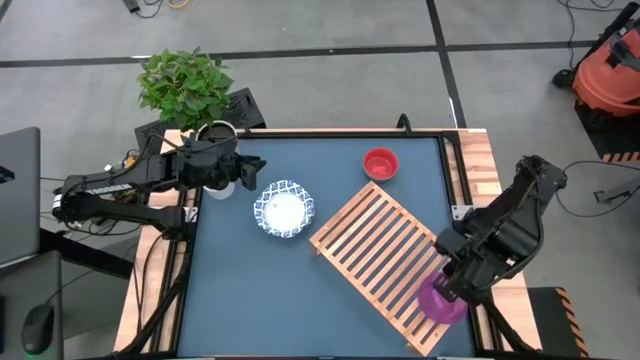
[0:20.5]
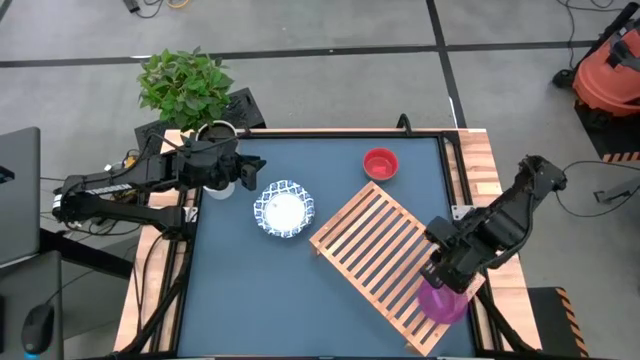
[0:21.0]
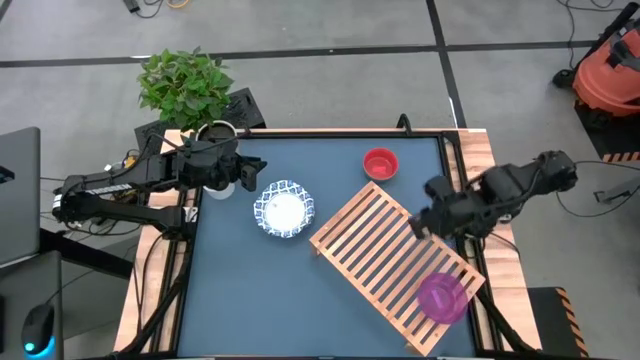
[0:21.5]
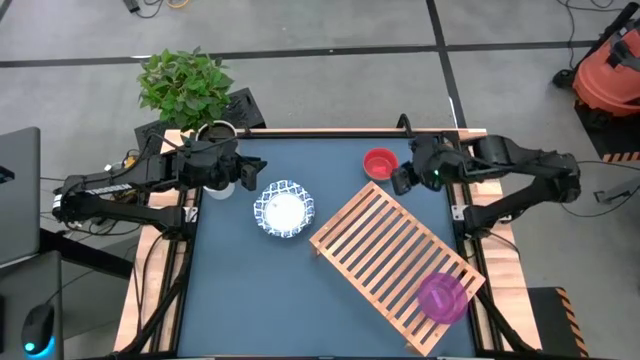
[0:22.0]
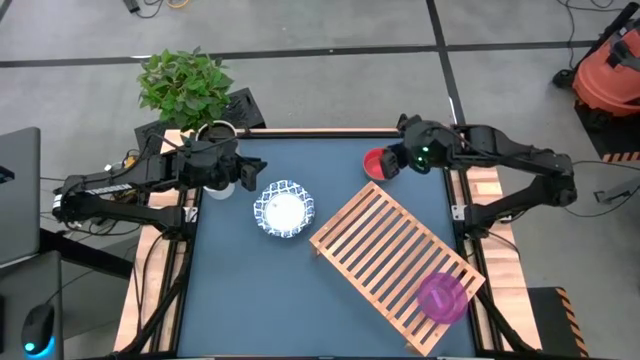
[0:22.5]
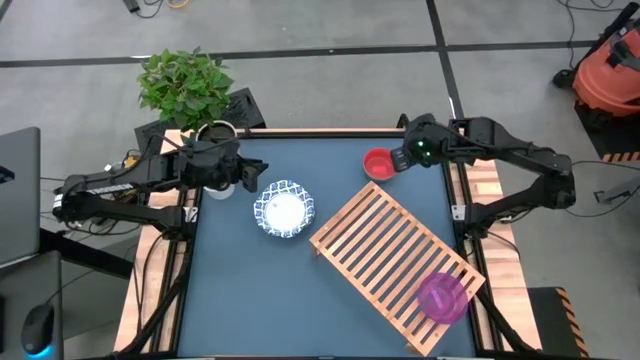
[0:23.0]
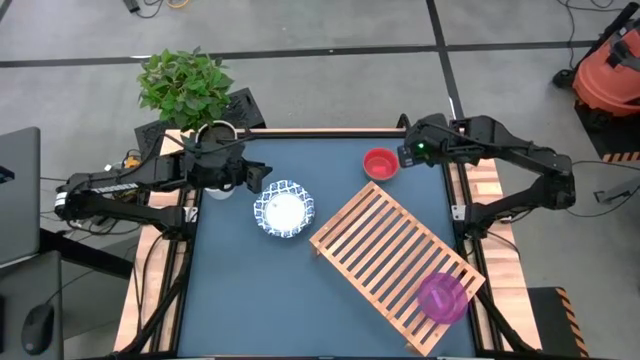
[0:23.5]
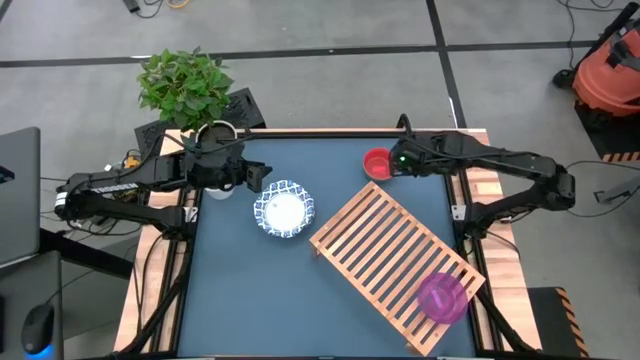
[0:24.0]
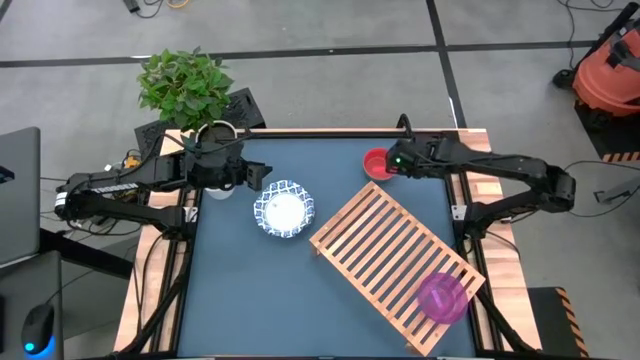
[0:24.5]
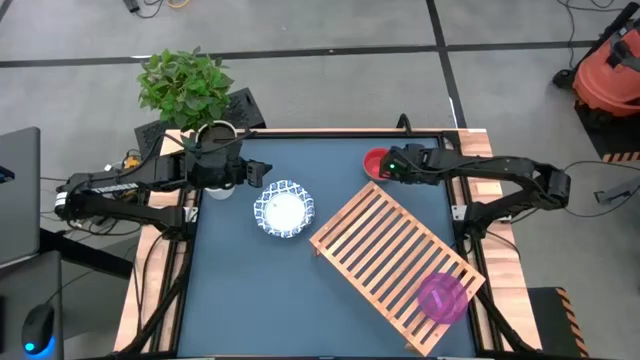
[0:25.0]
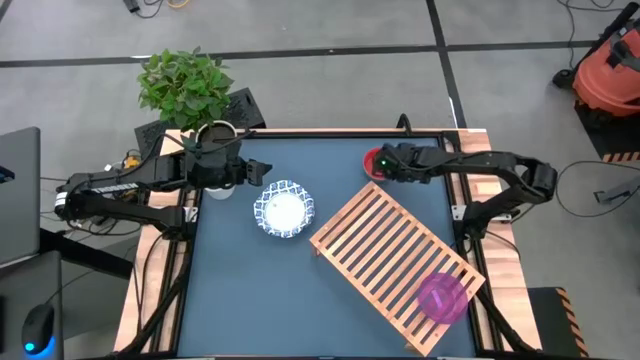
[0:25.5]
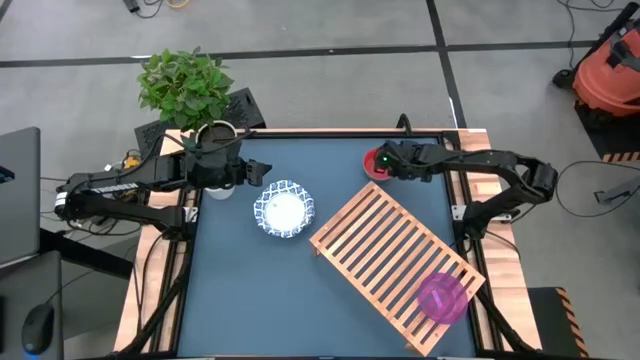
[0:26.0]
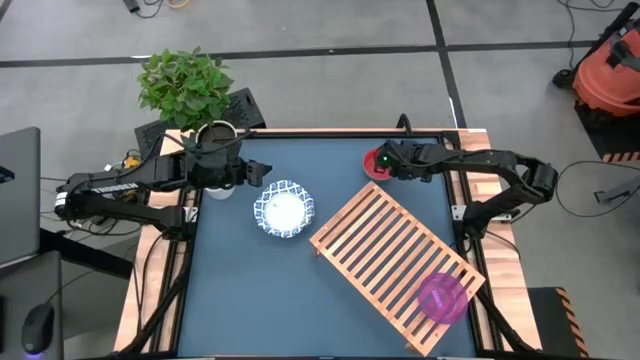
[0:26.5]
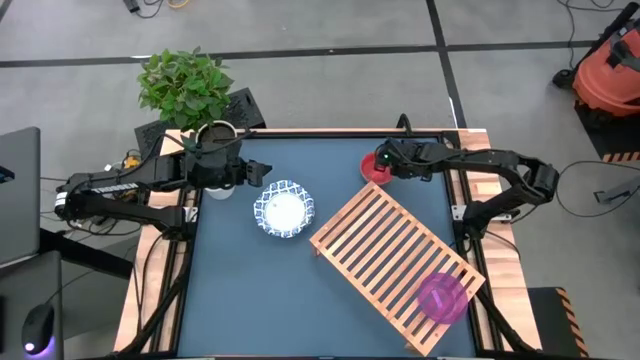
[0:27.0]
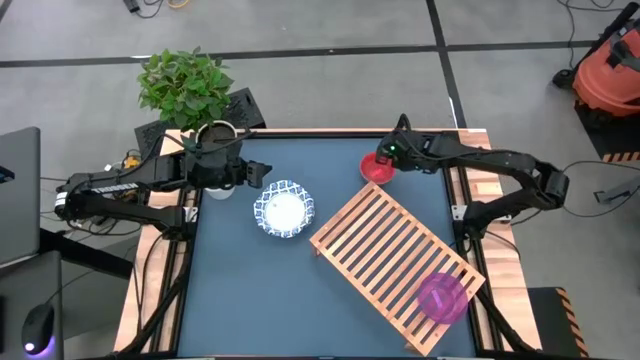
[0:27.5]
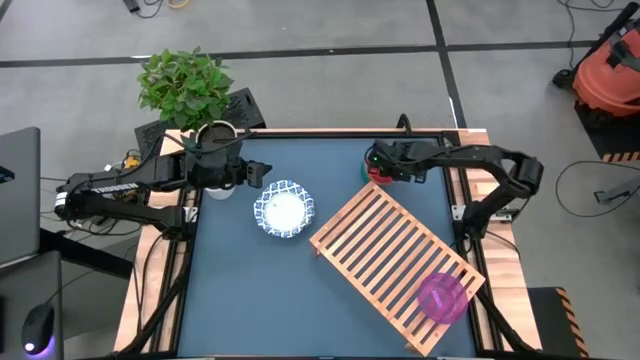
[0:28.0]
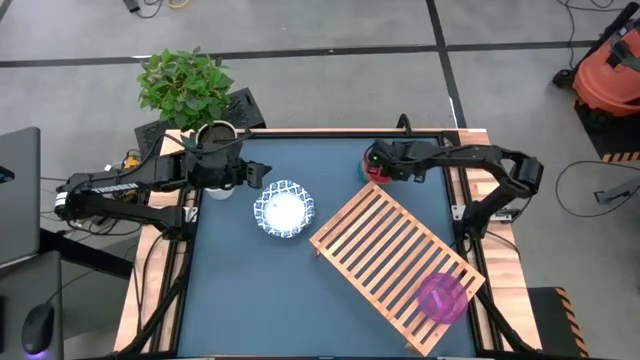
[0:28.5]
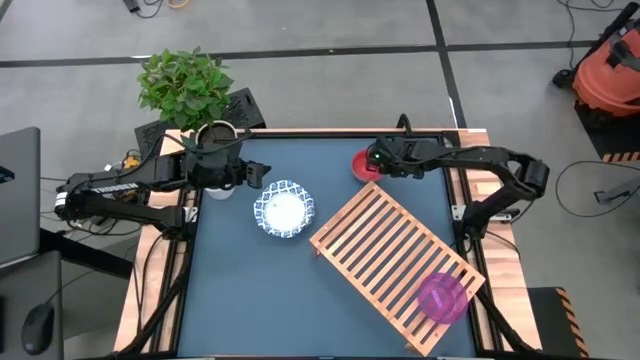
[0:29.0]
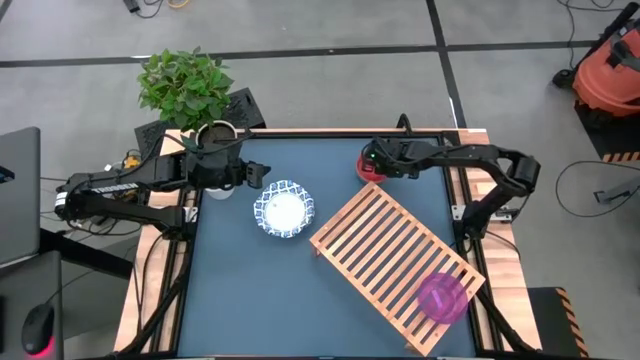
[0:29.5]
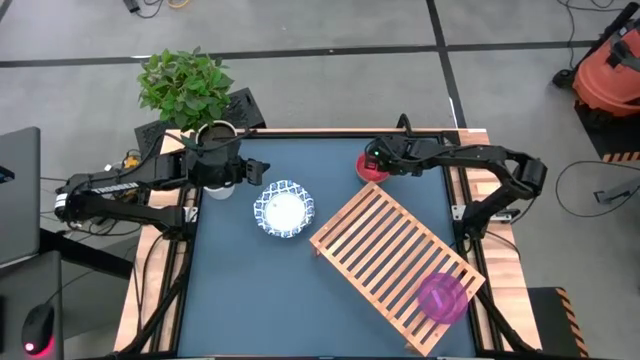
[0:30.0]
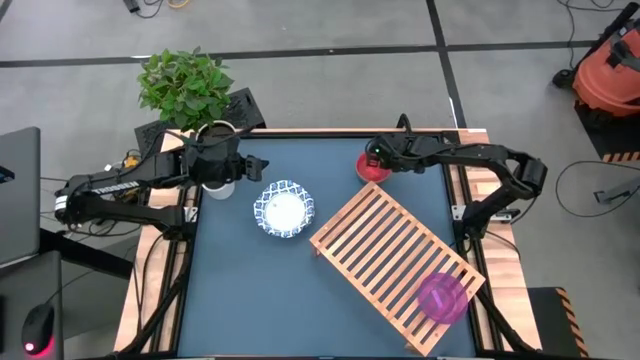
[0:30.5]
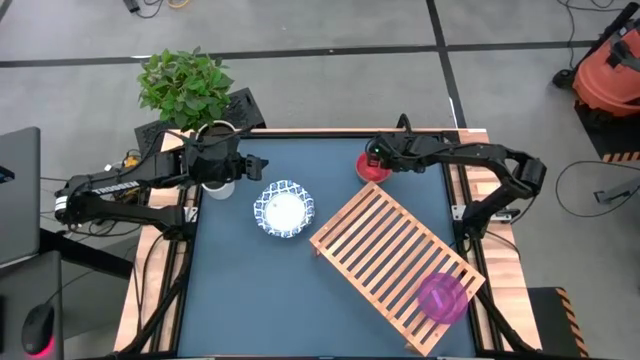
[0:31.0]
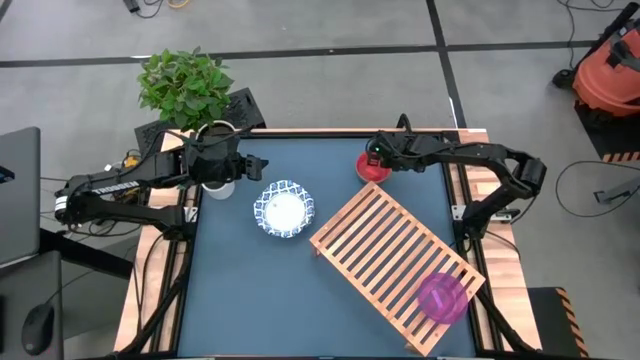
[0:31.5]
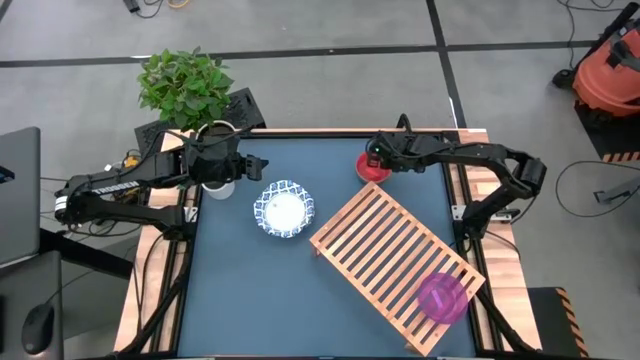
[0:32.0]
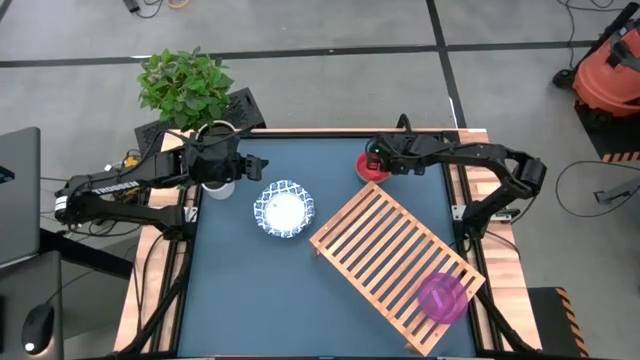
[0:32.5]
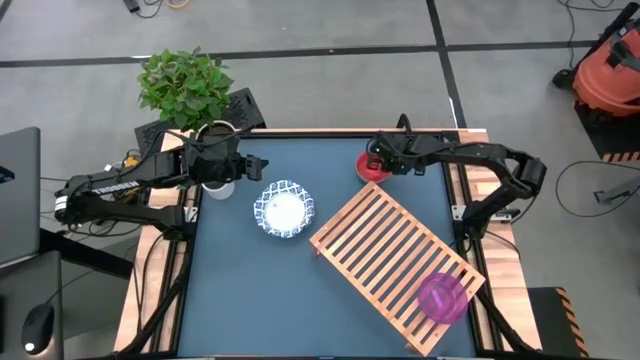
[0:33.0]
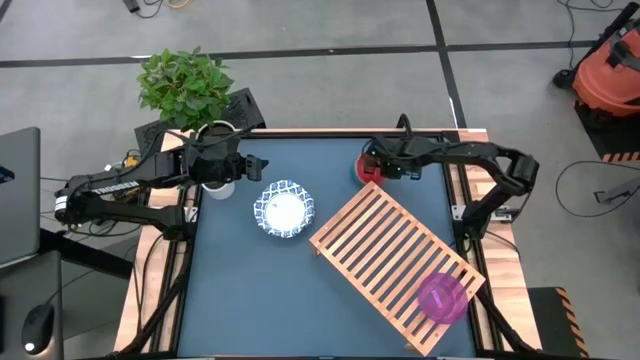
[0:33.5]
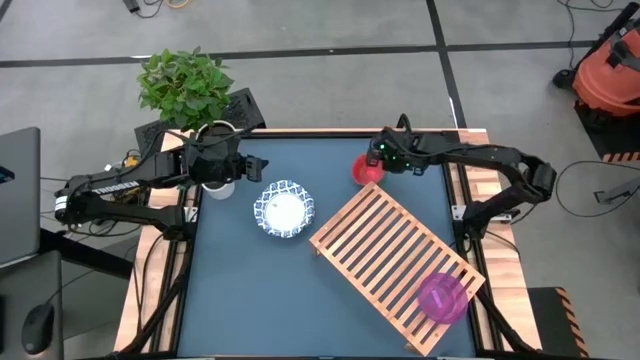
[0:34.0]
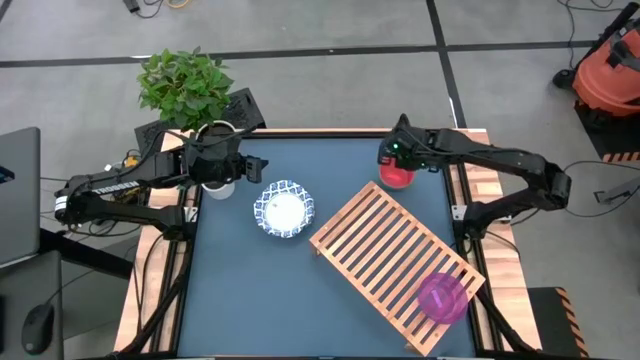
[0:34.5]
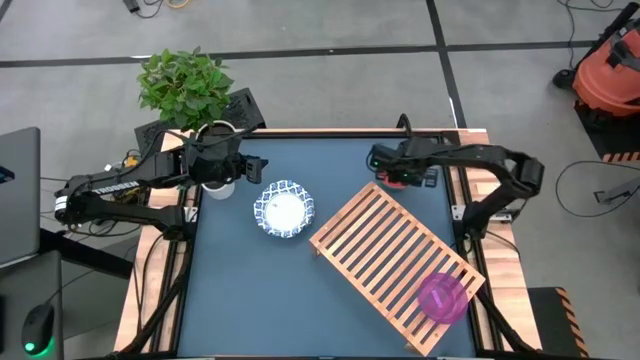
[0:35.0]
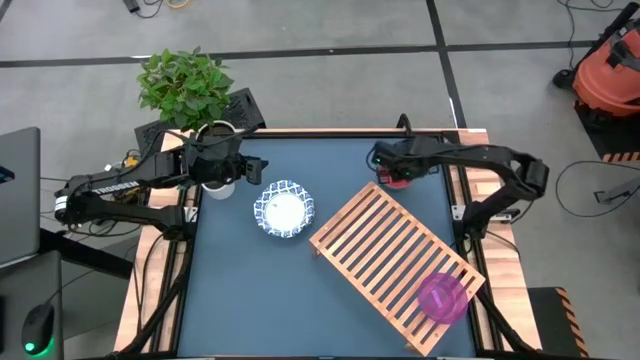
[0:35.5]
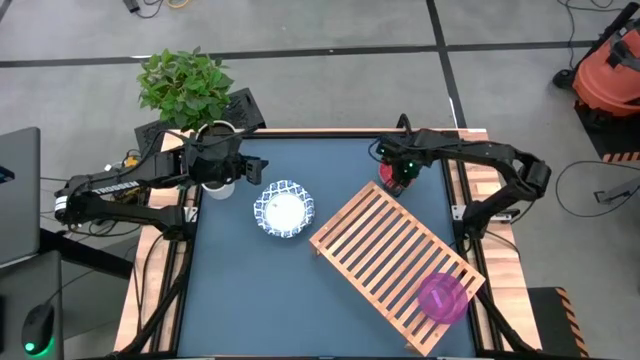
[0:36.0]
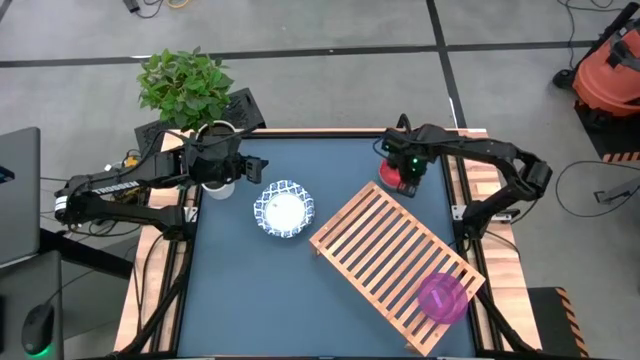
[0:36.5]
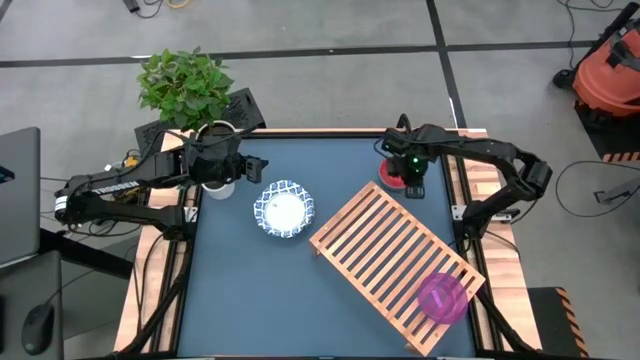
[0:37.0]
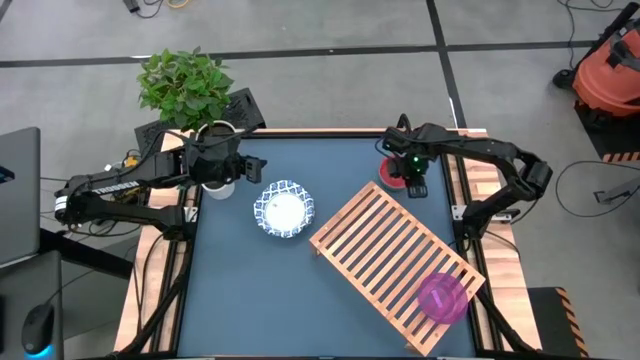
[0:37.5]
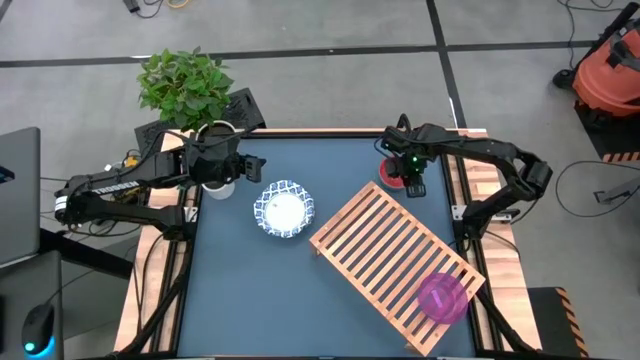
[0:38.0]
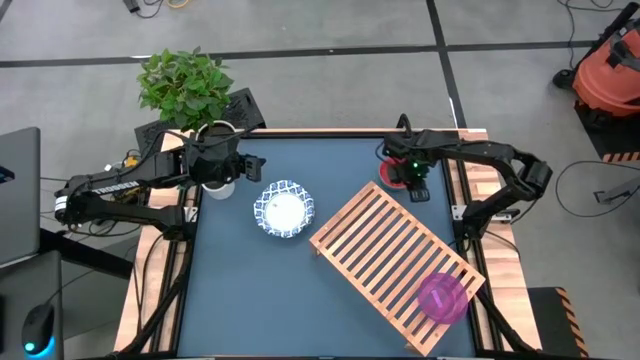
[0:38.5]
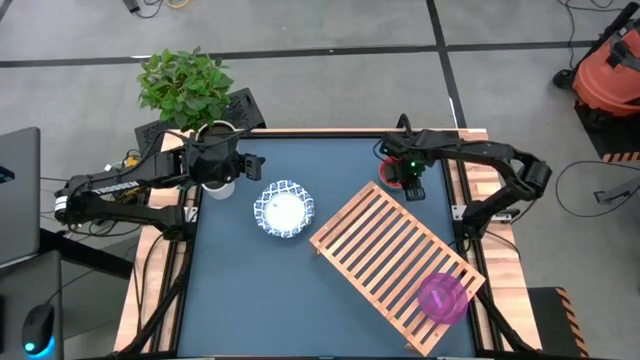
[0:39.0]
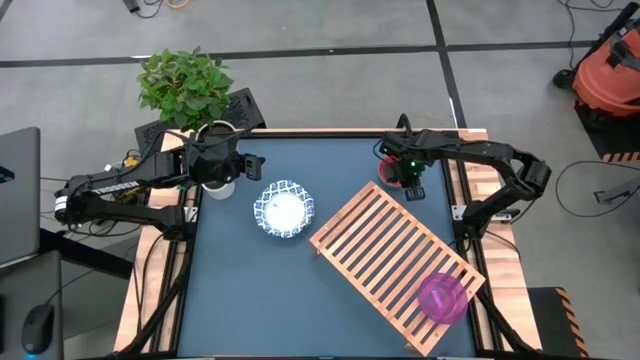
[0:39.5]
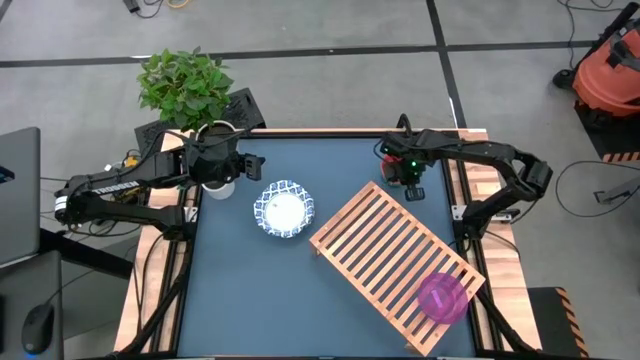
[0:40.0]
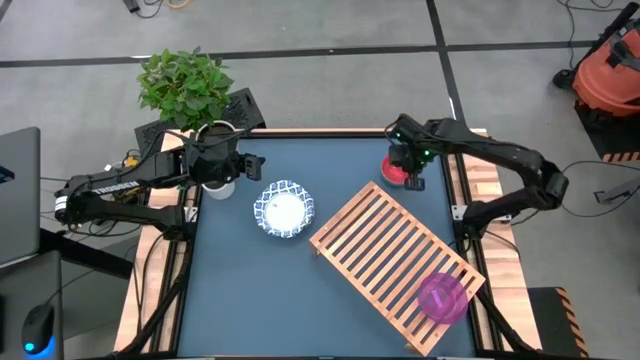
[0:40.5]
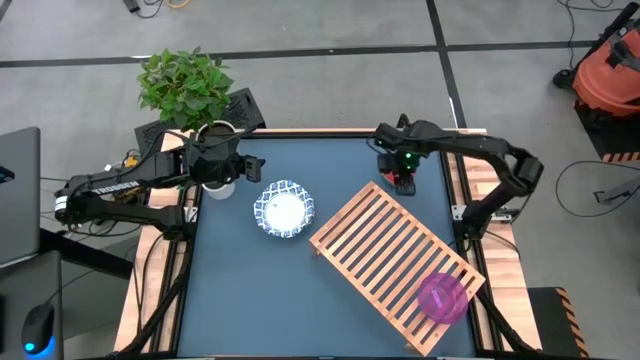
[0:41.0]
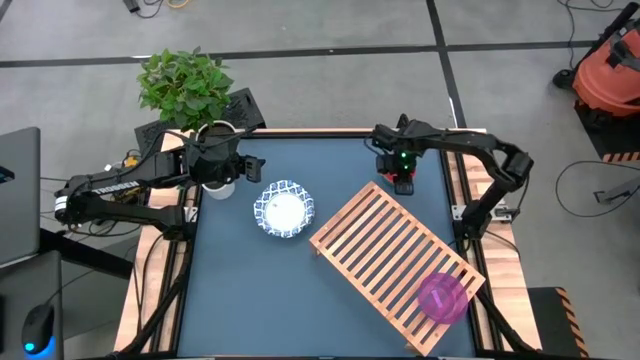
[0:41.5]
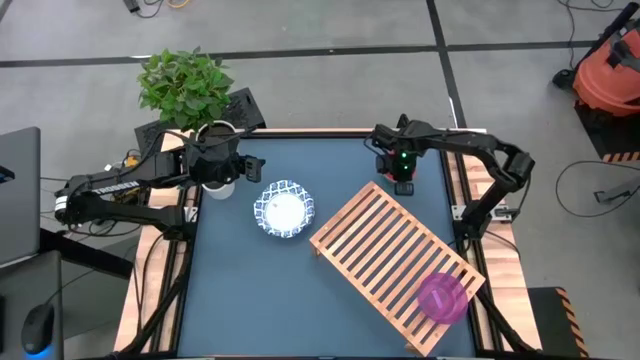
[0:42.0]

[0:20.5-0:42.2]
Task: Place and stack bowls onto a shelf
Stack the small red bowl on top of the small purple bowl on the shelf

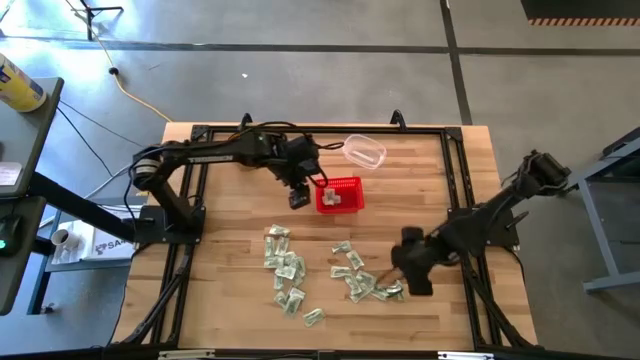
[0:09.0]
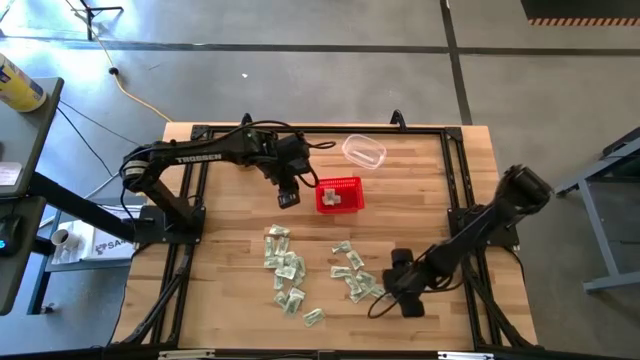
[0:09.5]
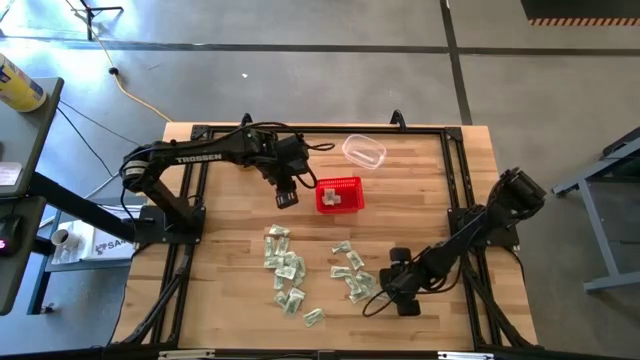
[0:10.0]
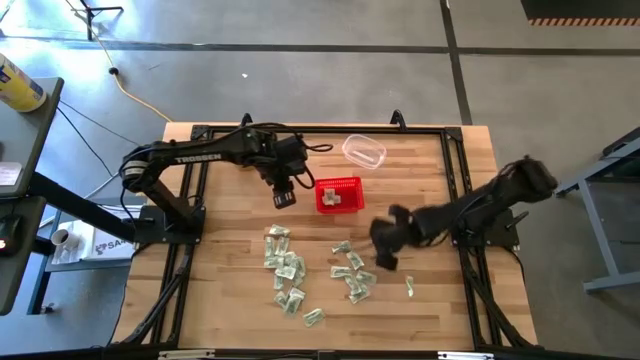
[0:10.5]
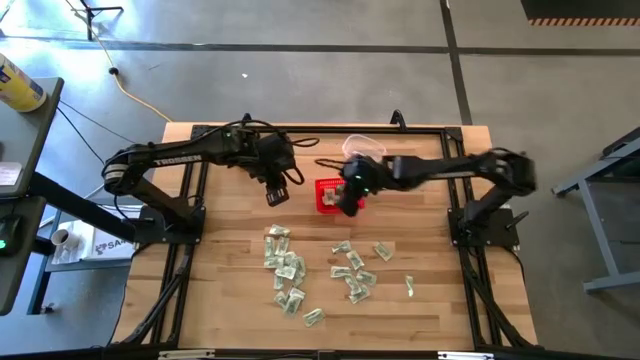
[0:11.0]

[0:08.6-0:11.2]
Task: Pick and place items into bin
Put the green packet into the red basket
